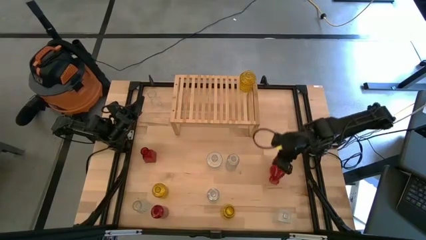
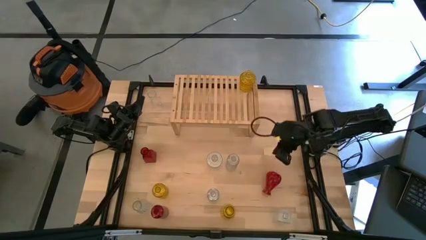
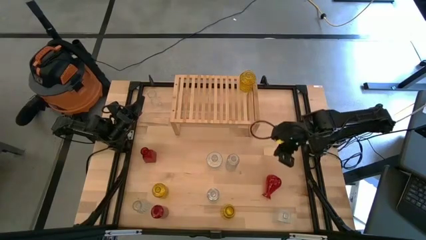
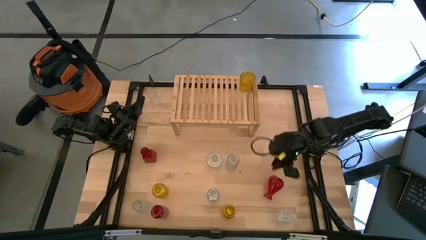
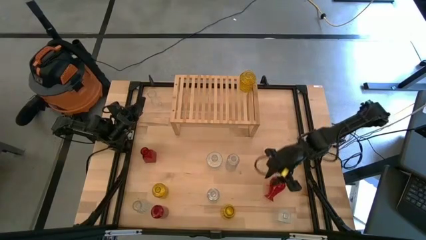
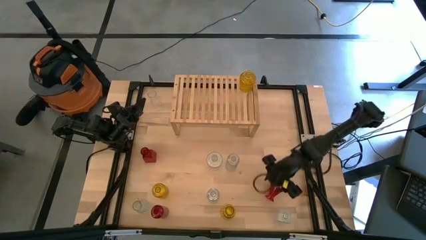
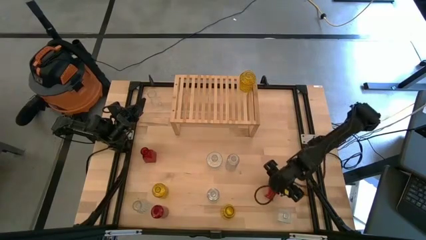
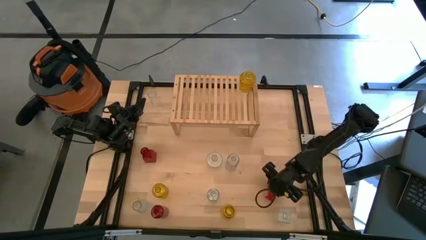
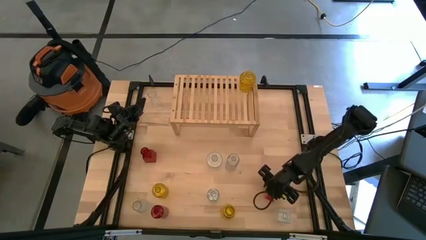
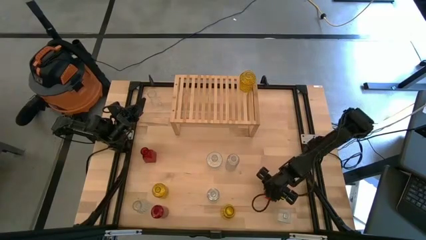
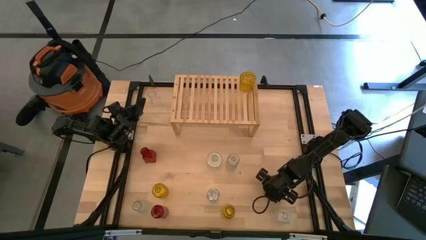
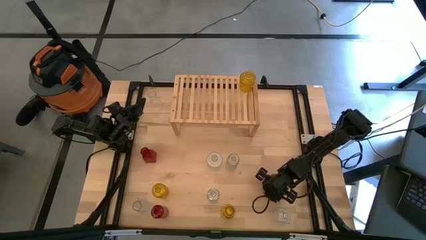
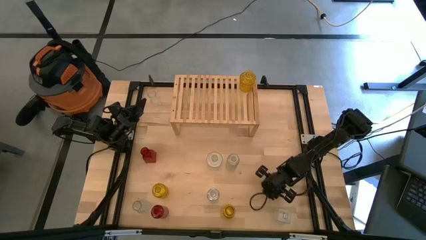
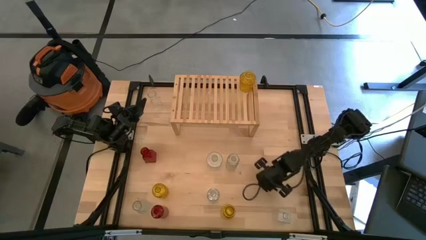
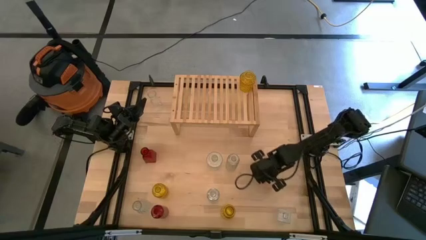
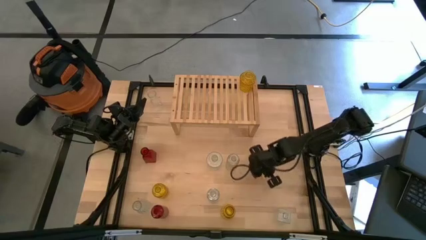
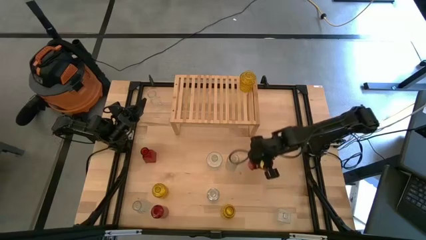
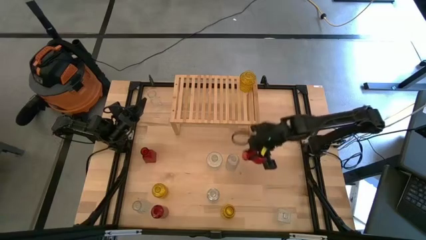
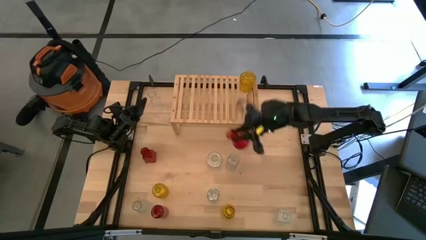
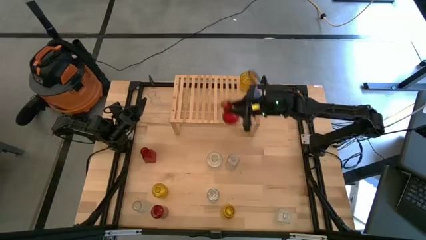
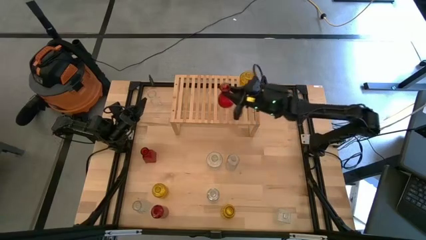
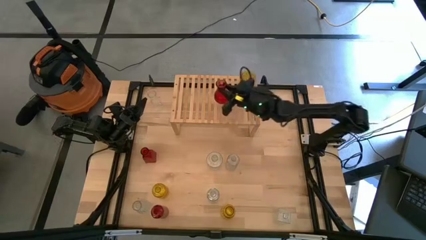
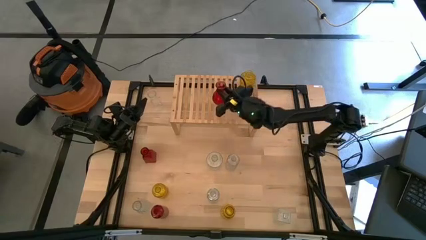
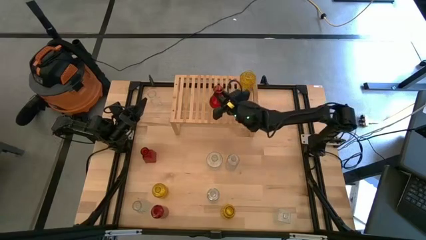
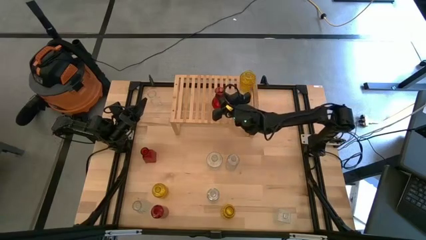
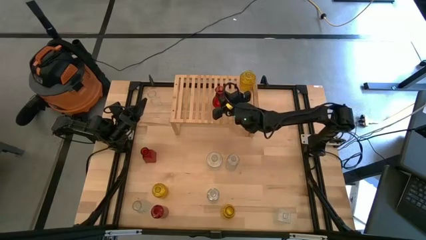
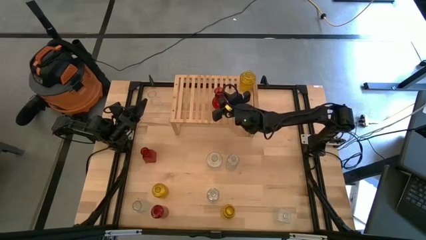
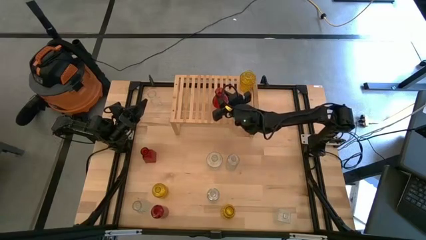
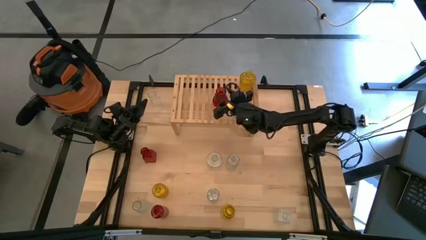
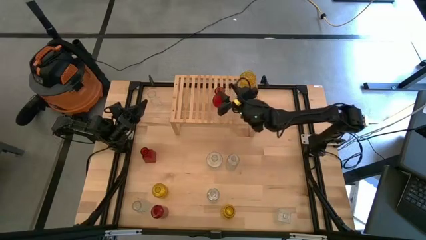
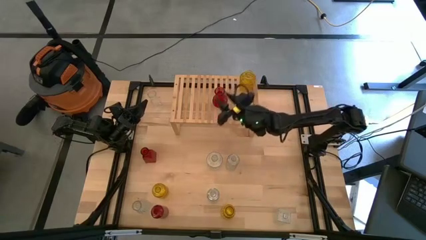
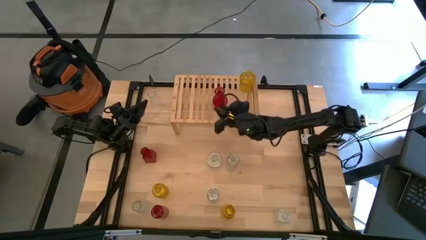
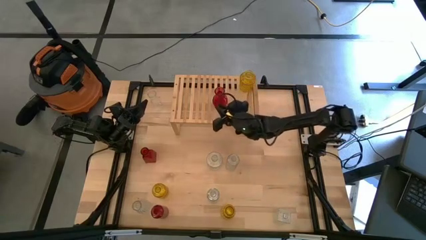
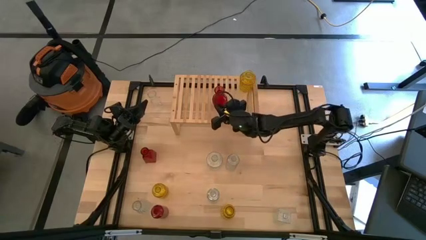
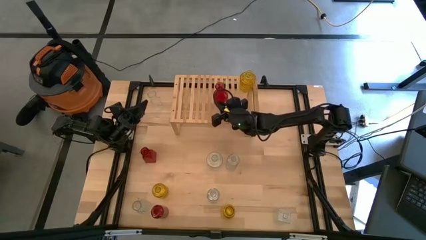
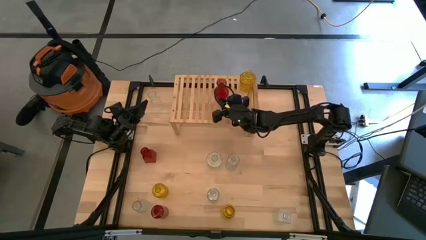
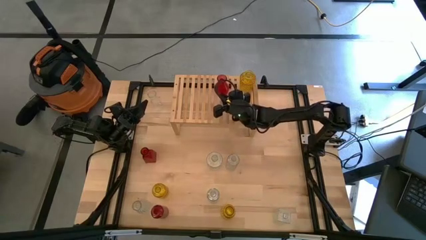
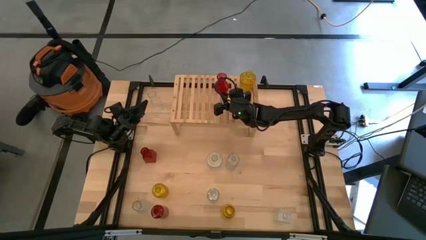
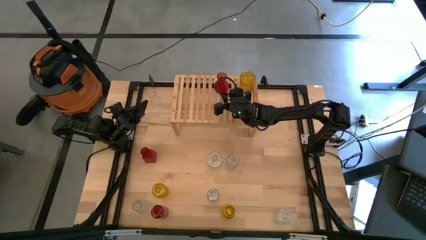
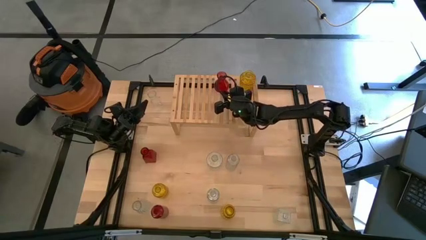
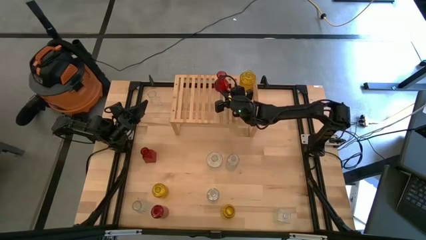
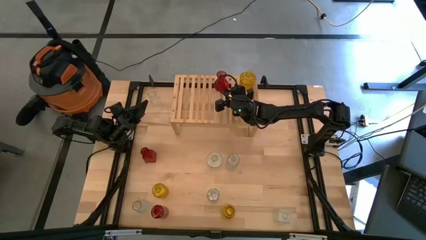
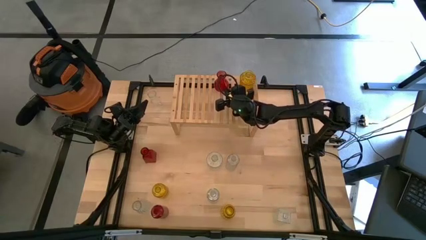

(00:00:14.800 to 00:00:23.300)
Task: sort vases onto shelf
Put the red vase on the shelf

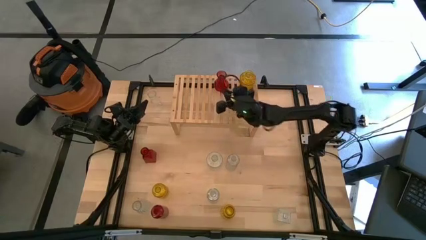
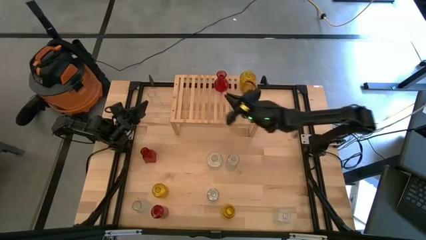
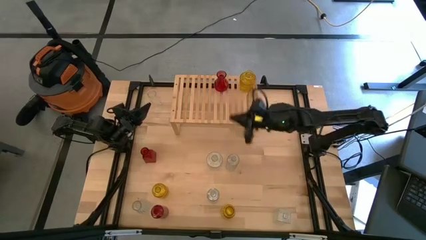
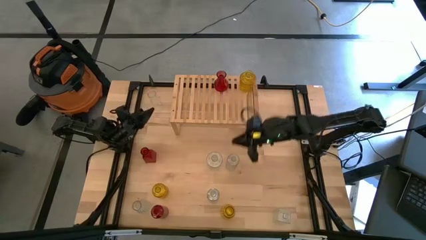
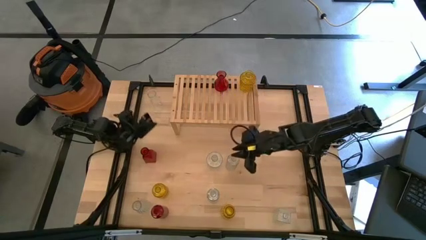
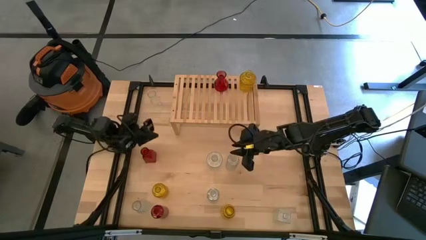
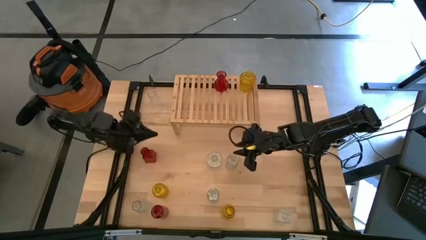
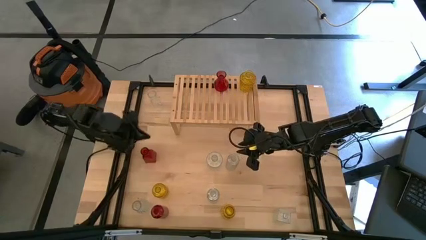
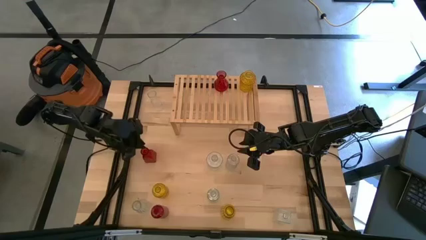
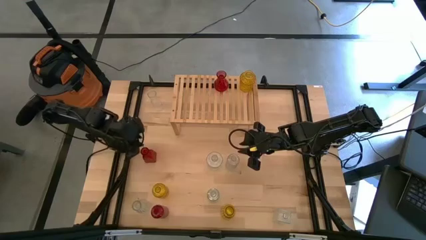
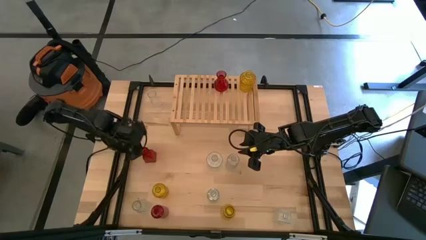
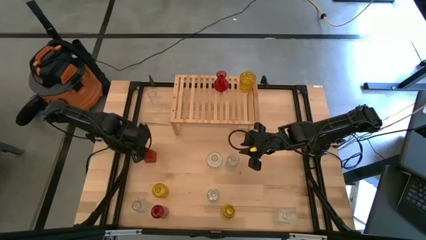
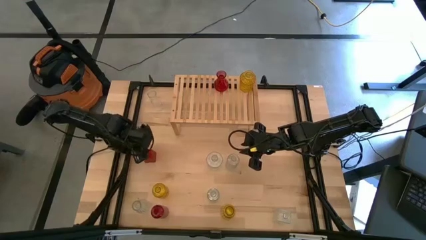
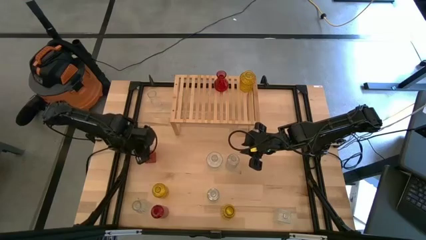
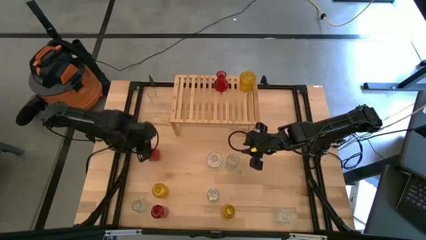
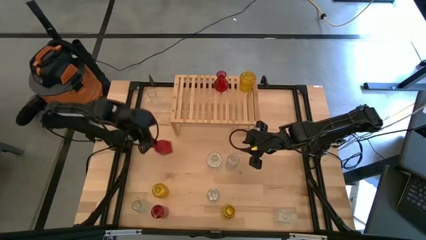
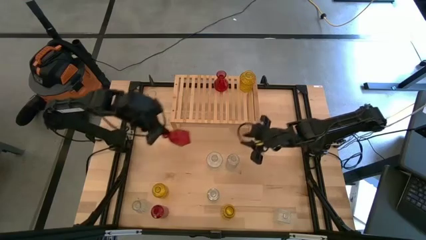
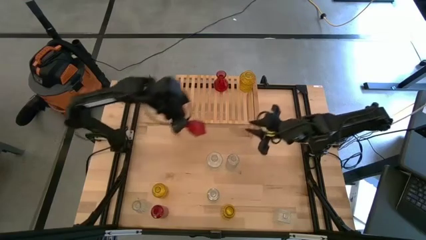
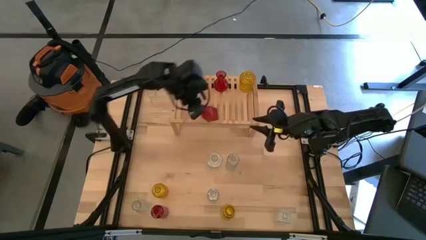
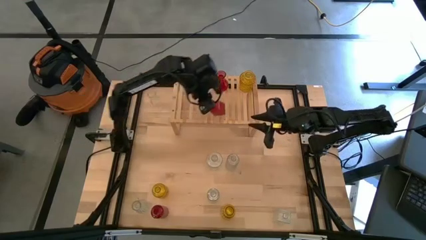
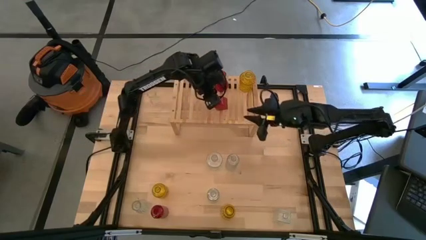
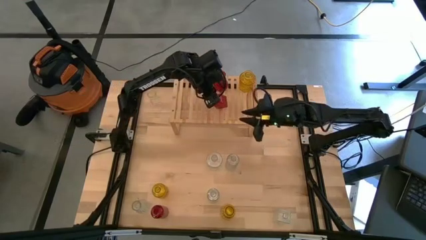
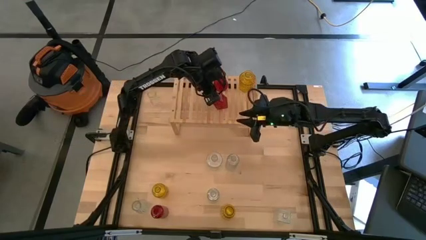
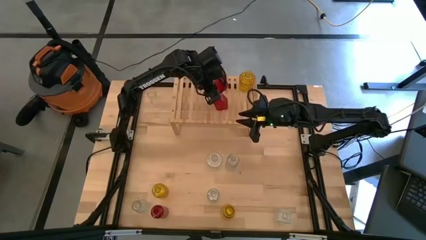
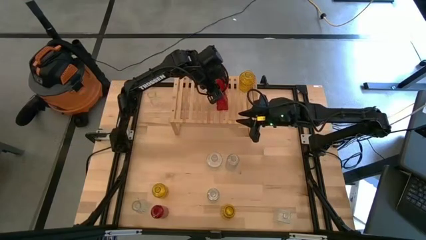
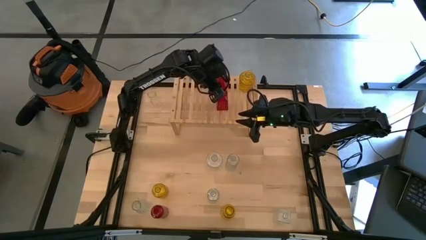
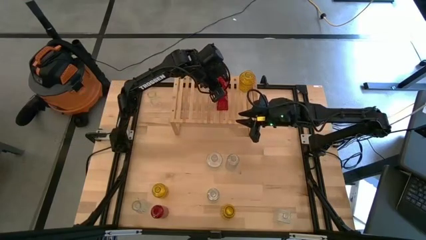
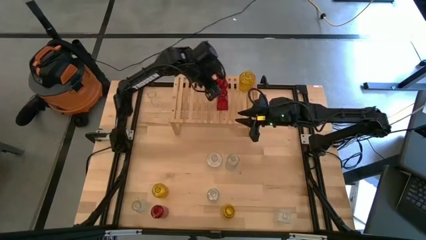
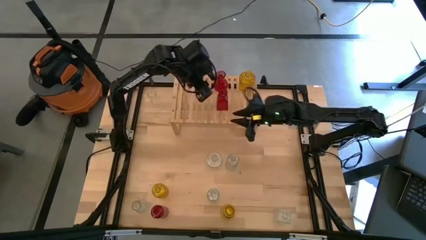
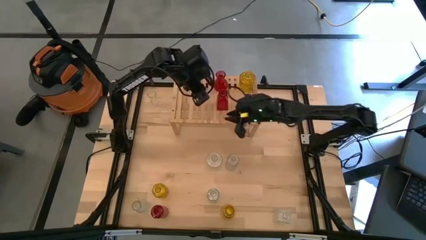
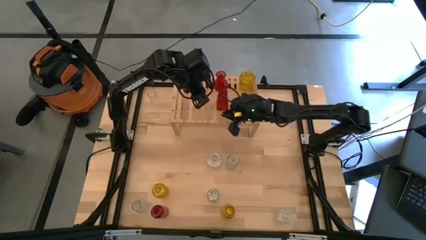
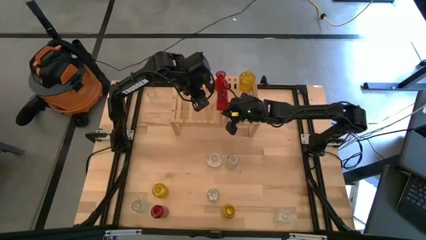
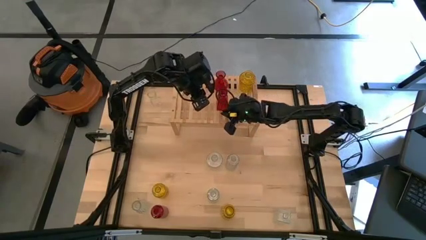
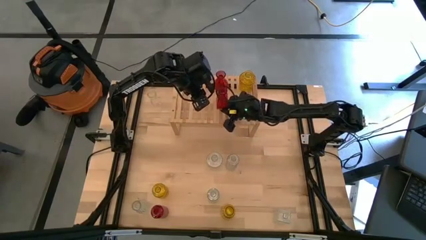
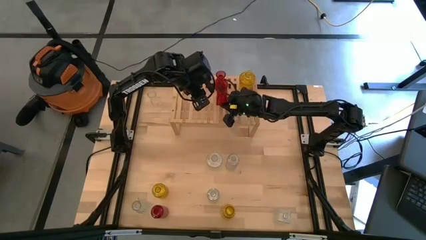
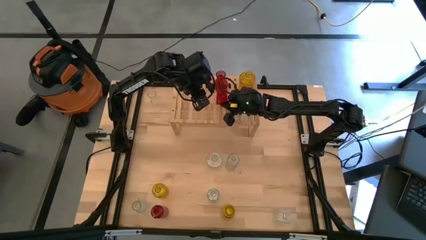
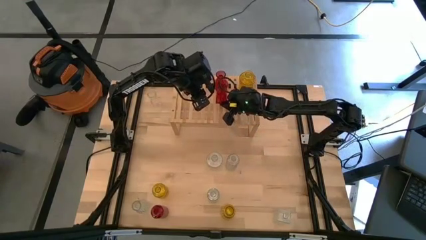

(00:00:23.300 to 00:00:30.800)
Put the red vase on the shelf align with the other red vase
